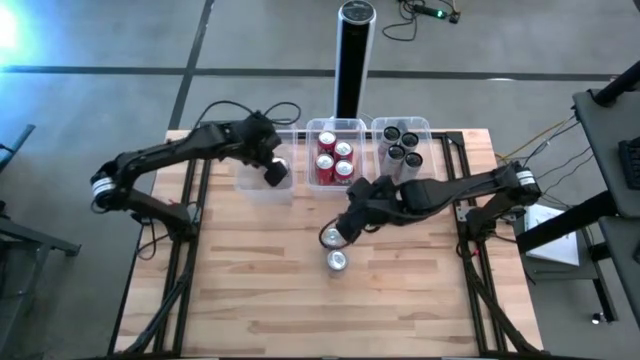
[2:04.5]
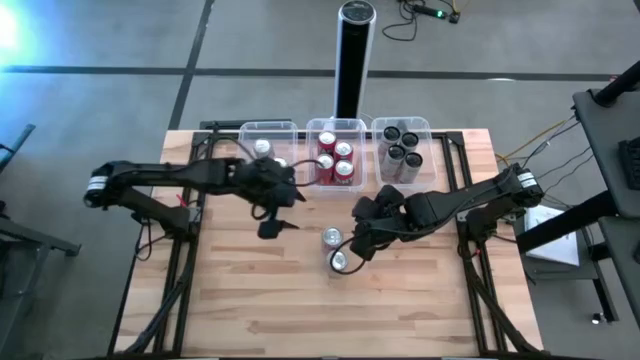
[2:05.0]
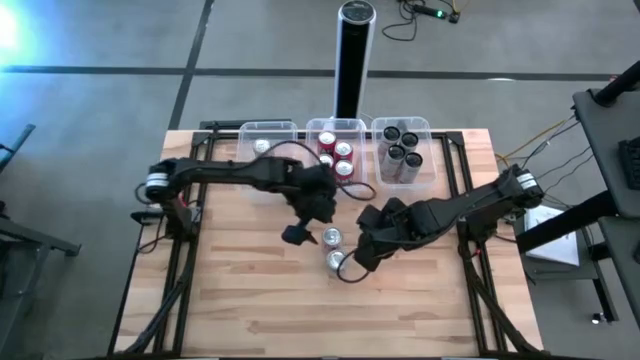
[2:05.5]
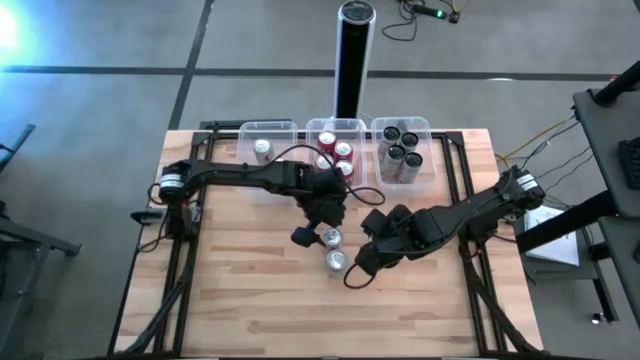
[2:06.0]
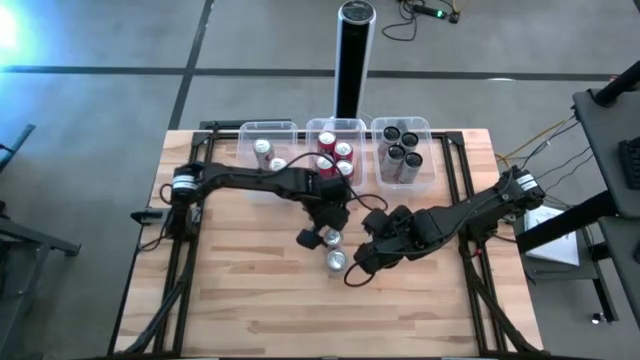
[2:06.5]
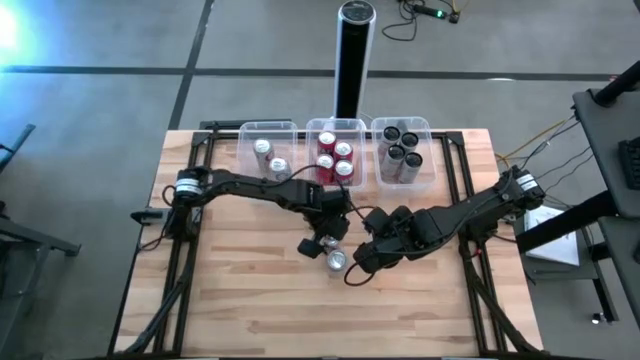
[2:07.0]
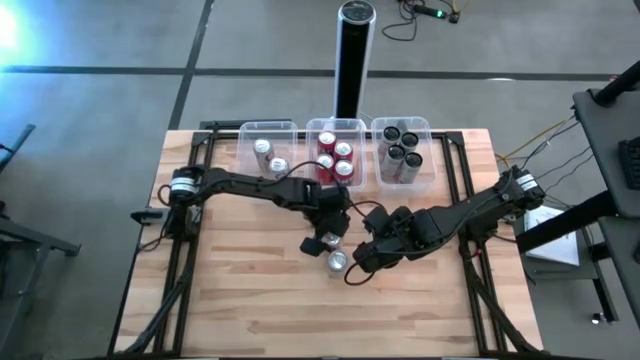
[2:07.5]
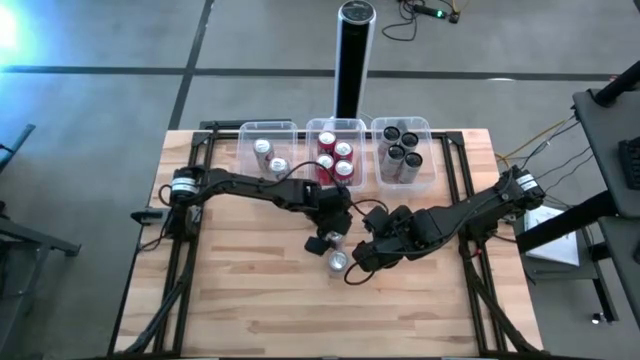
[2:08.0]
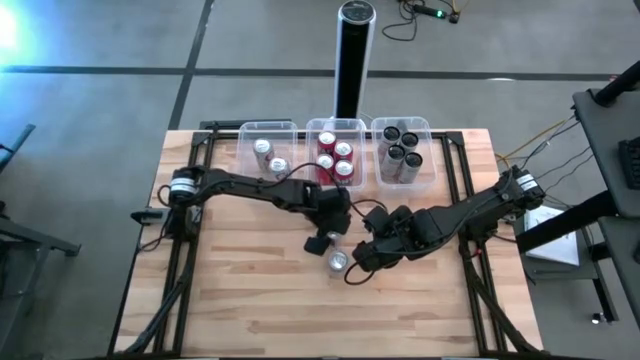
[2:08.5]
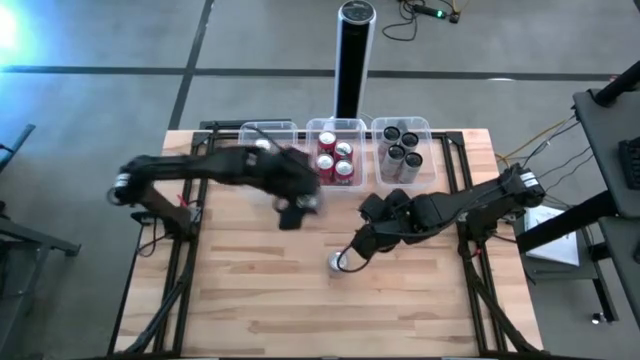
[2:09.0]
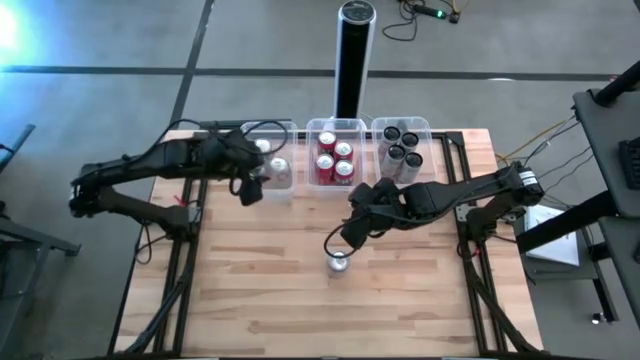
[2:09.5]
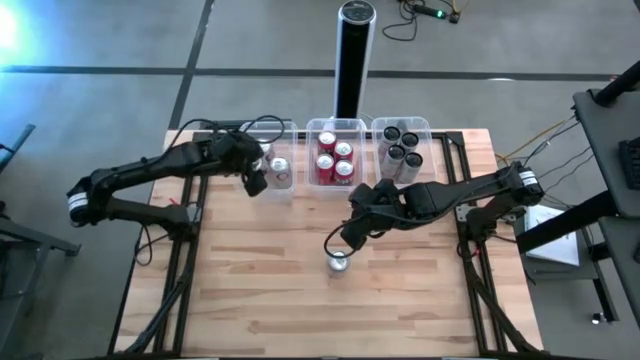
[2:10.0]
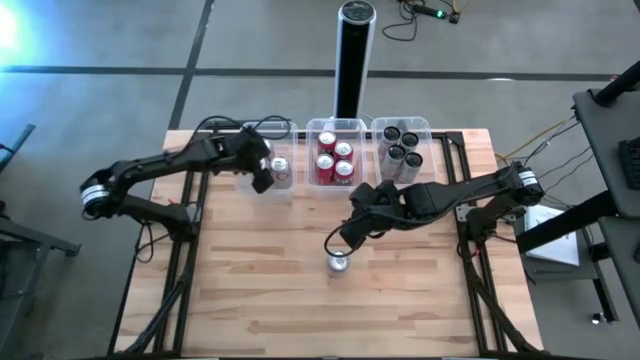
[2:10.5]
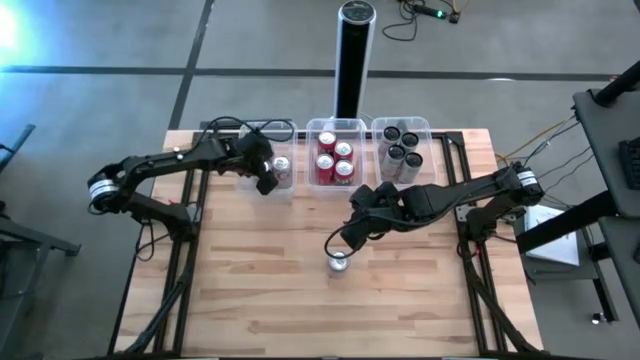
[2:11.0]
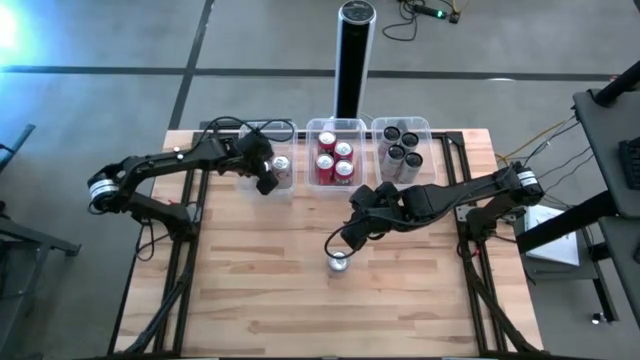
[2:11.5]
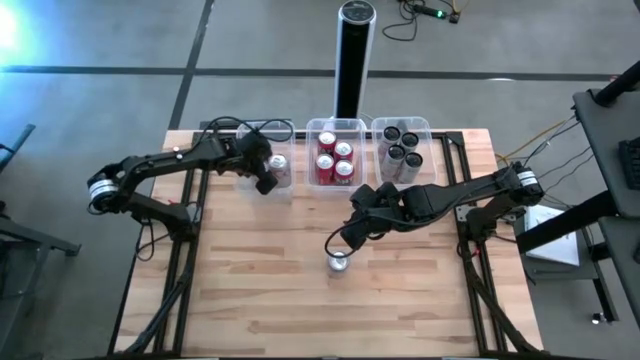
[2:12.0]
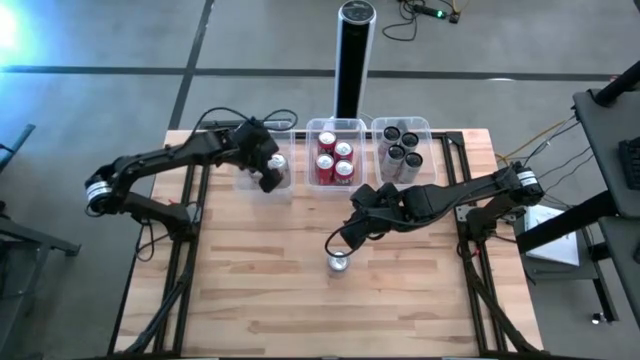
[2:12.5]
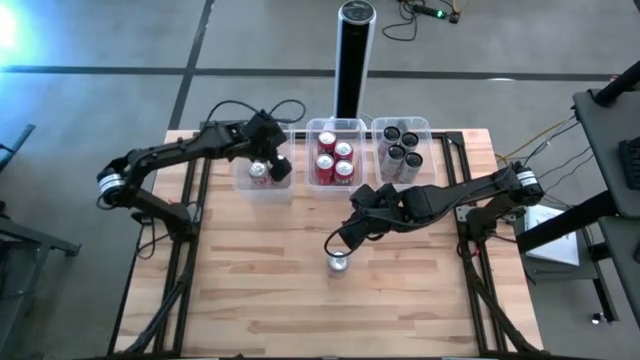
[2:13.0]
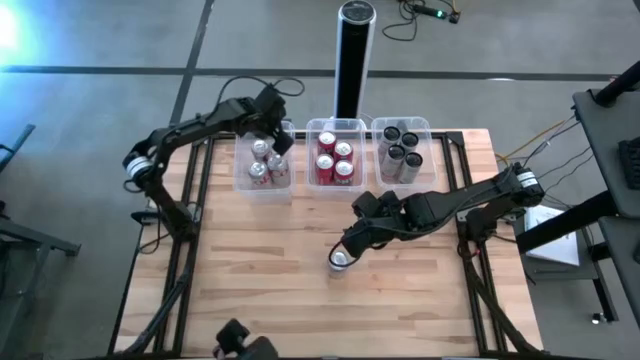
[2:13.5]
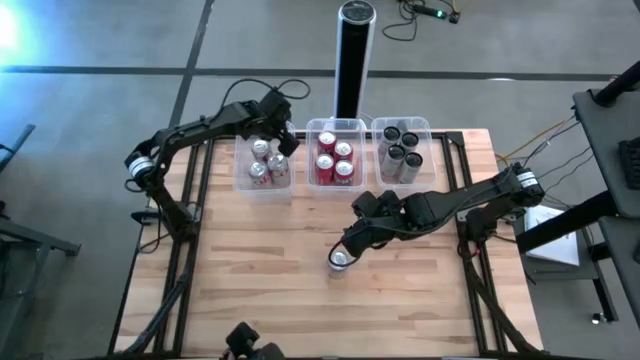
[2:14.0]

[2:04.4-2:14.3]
Task: Sort soda cans
Put the red-silver soda can into the left white bin

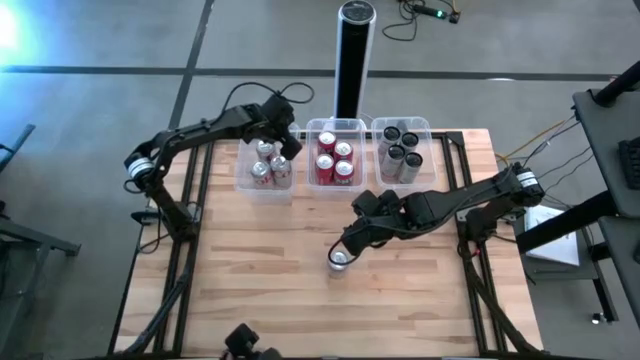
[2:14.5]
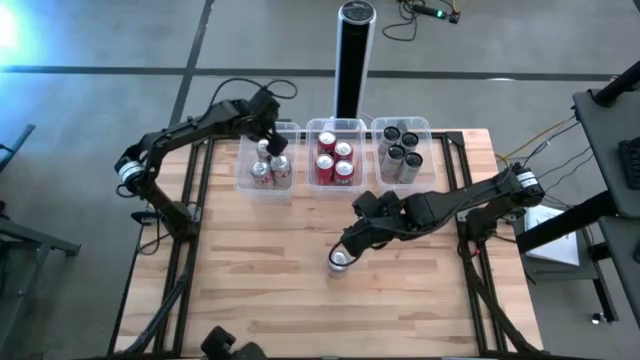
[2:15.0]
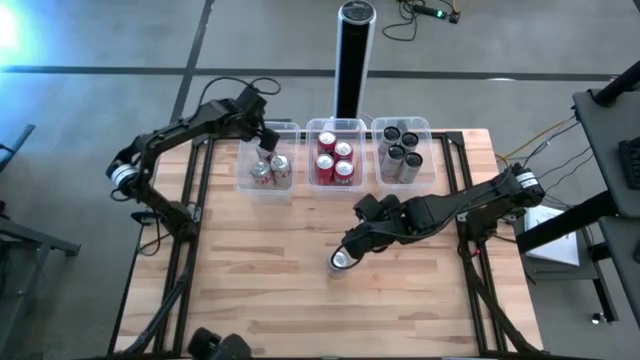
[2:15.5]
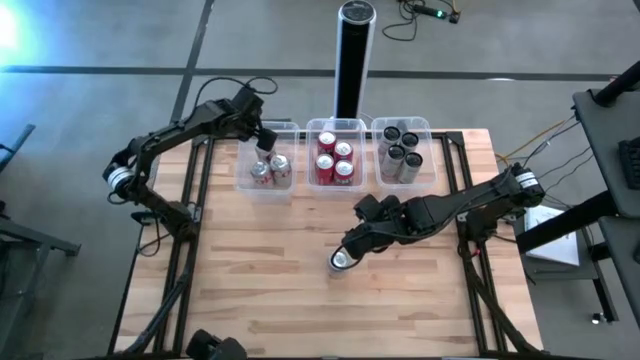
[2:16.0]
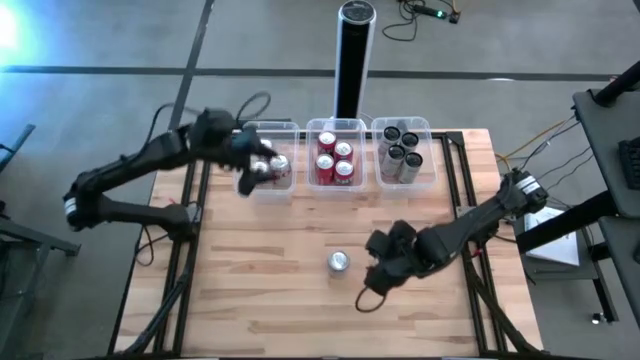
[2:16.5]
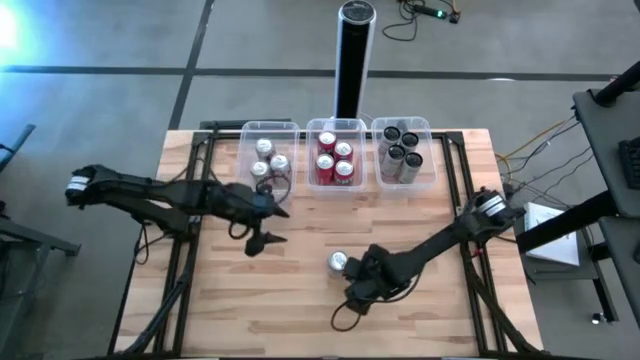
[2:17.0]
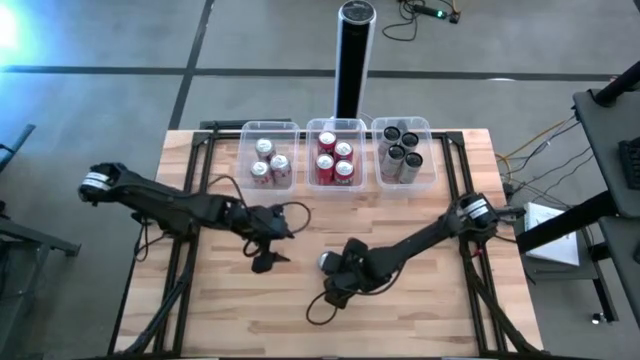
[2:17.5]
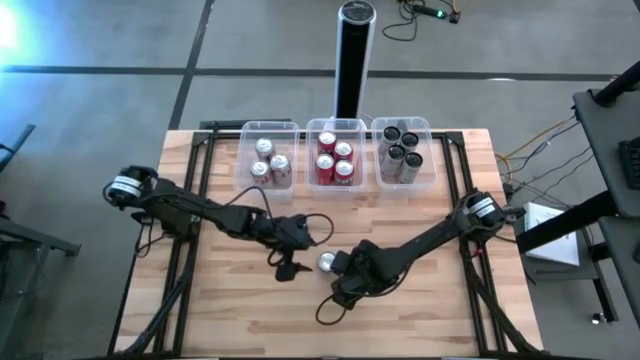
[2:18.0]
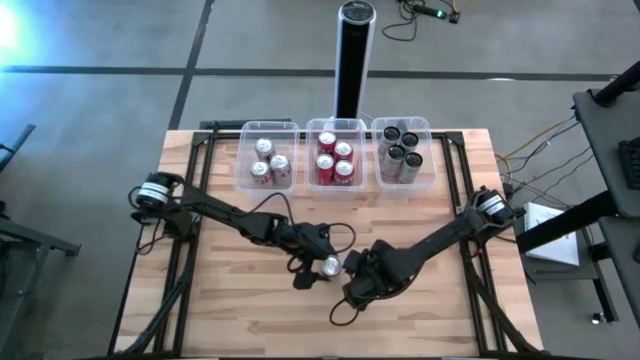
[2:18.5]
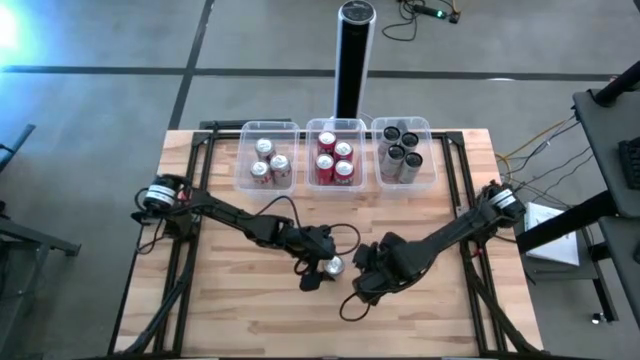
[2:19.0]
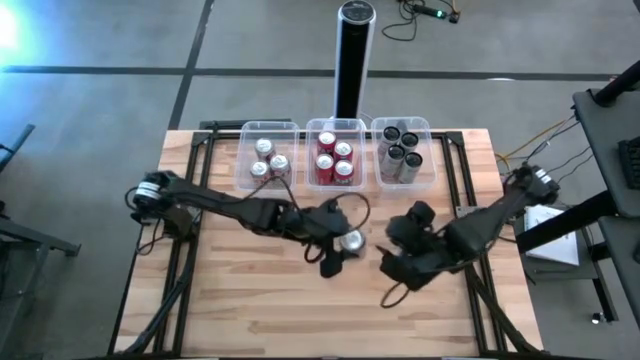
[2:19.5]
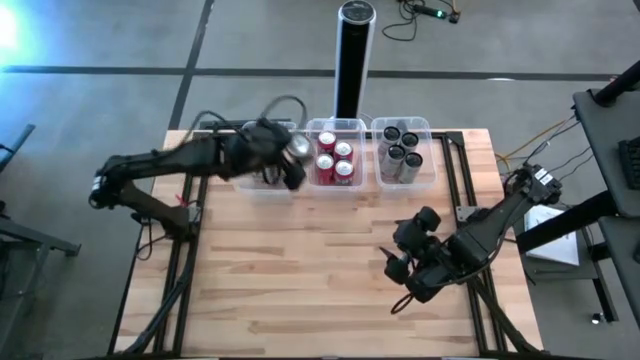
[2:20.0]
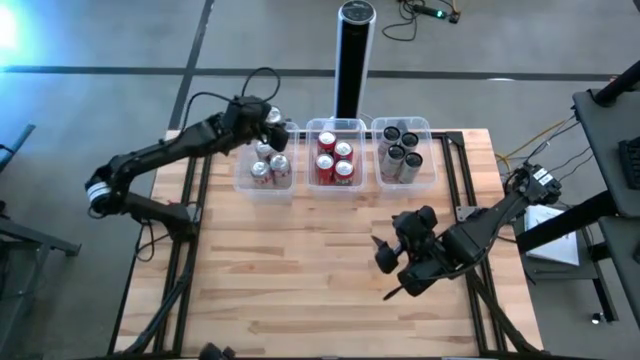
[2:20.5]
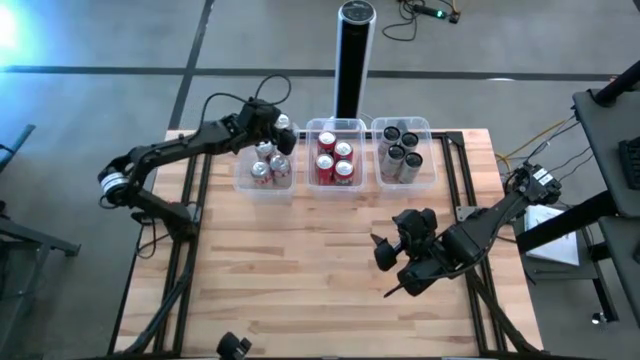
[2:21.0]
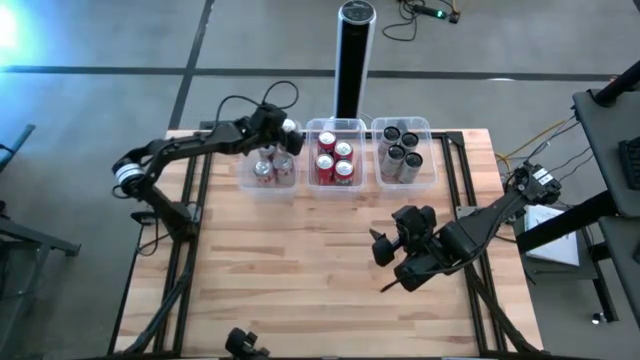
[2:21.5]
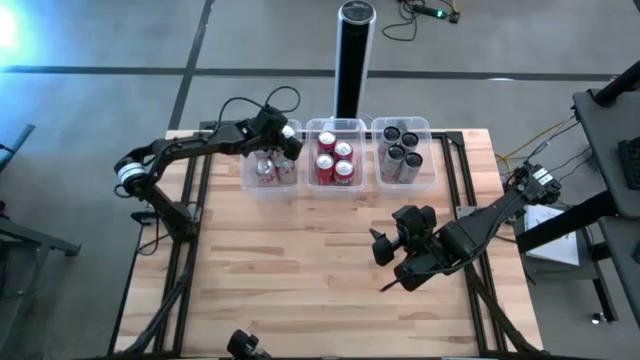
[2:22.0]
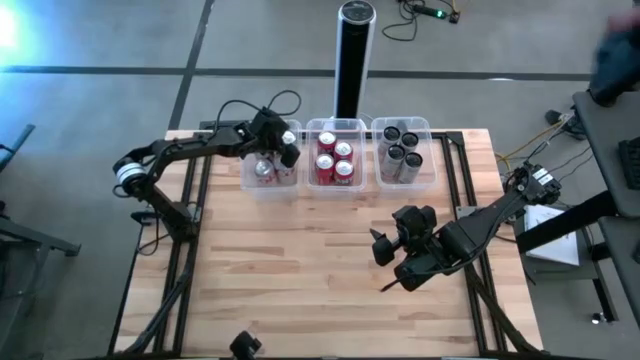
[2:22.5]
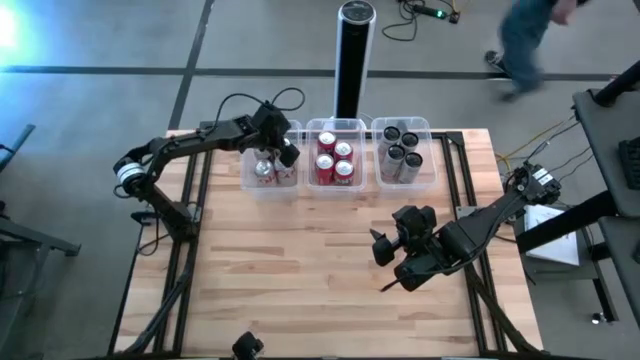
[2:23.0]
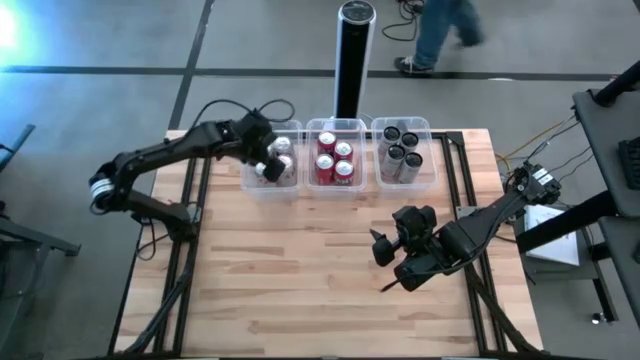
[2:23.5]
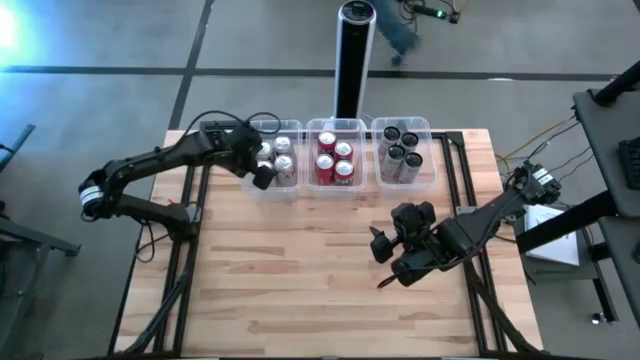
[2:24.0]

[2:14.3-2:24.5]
Put the red-silver soda can into the left white bin
